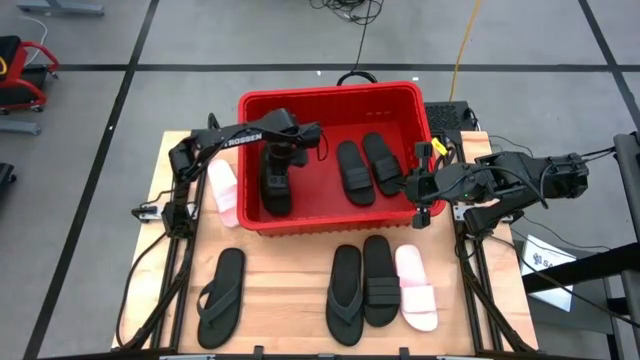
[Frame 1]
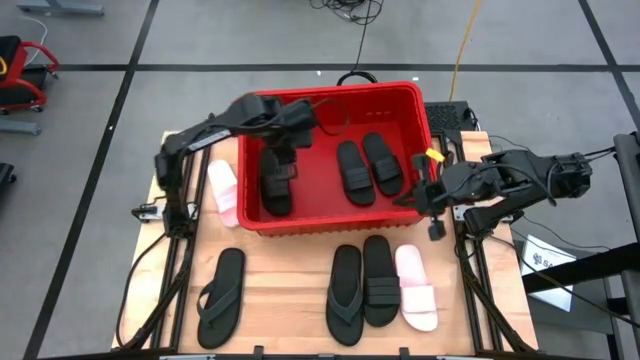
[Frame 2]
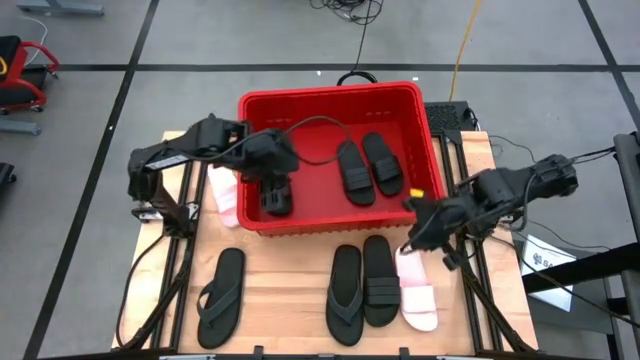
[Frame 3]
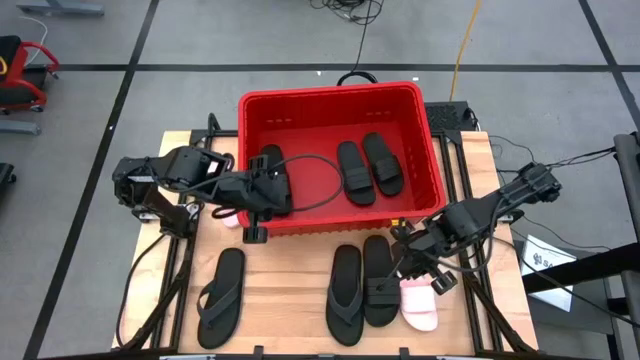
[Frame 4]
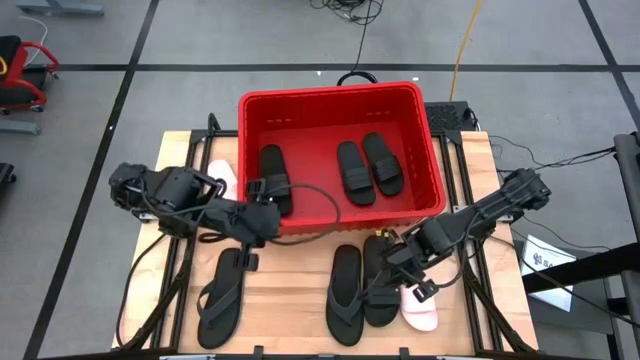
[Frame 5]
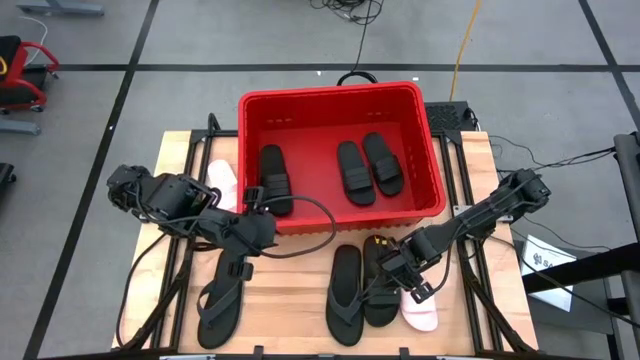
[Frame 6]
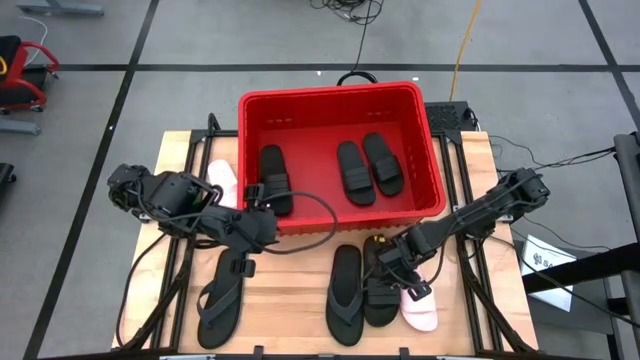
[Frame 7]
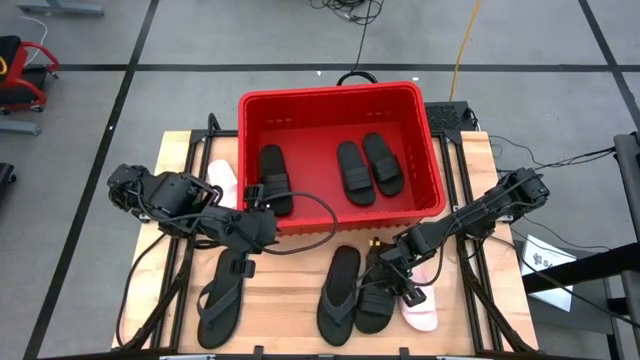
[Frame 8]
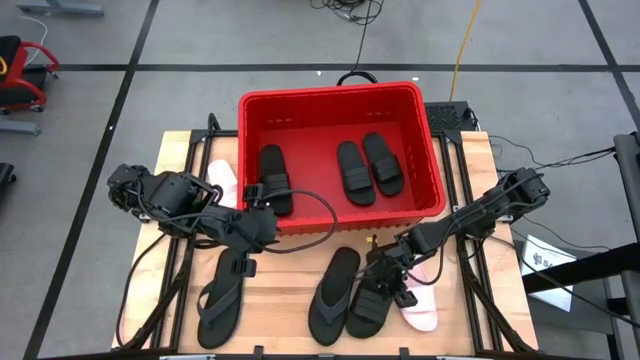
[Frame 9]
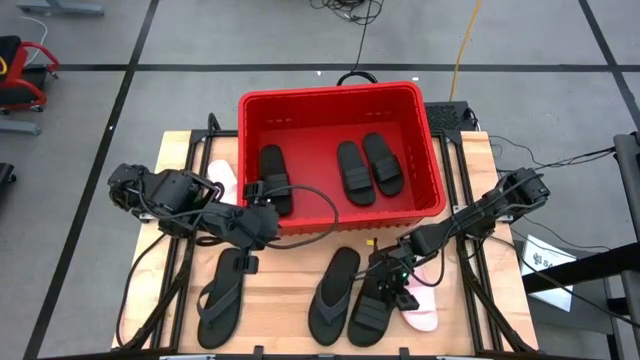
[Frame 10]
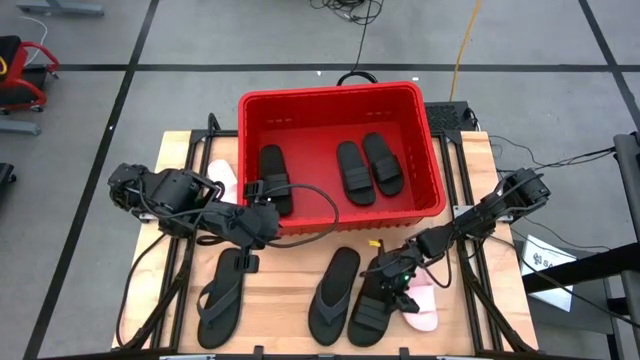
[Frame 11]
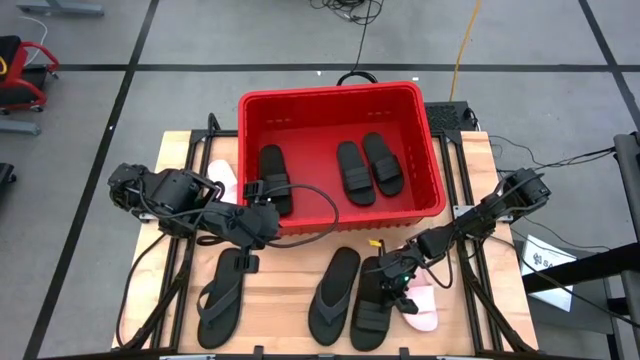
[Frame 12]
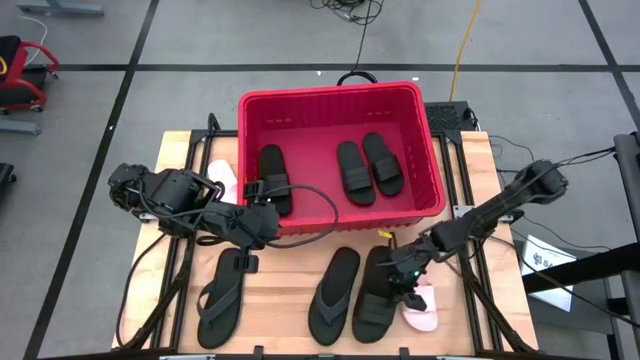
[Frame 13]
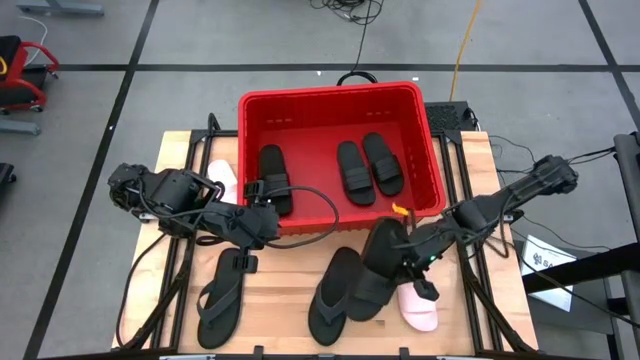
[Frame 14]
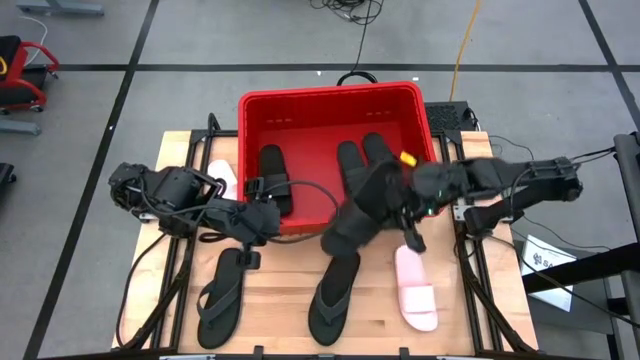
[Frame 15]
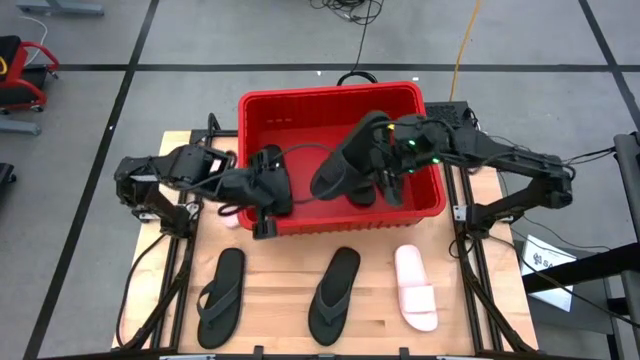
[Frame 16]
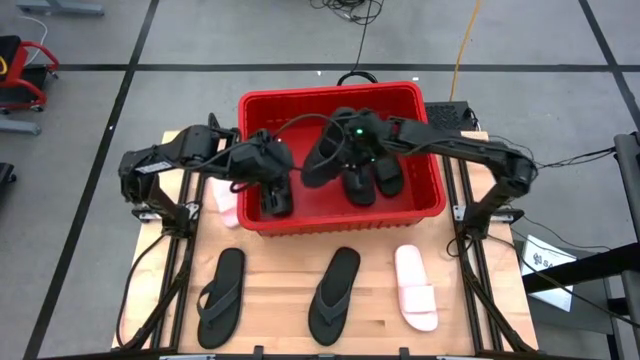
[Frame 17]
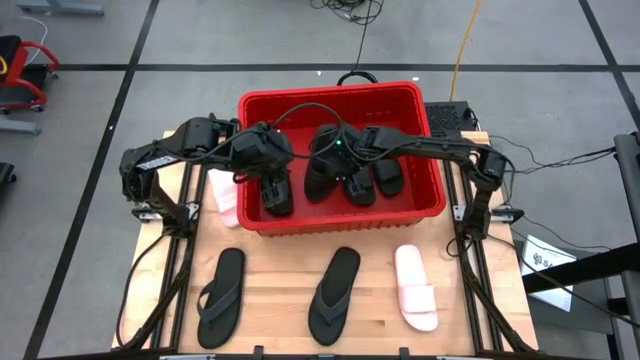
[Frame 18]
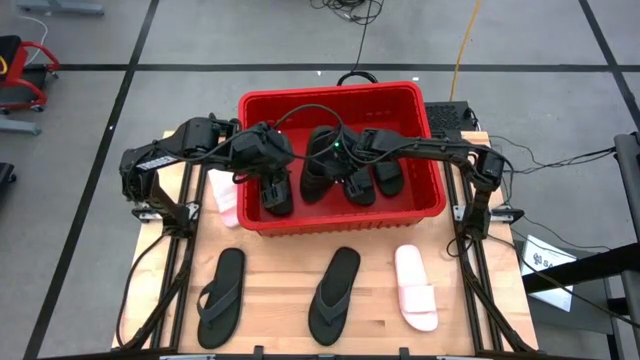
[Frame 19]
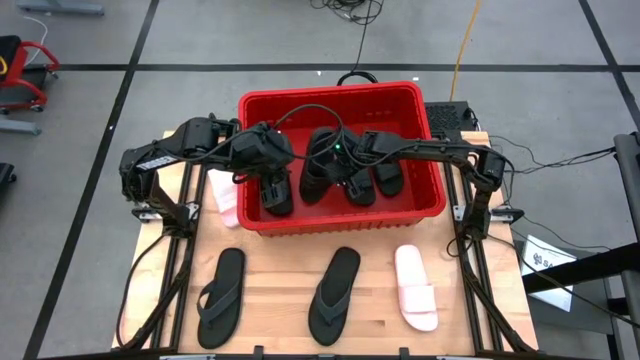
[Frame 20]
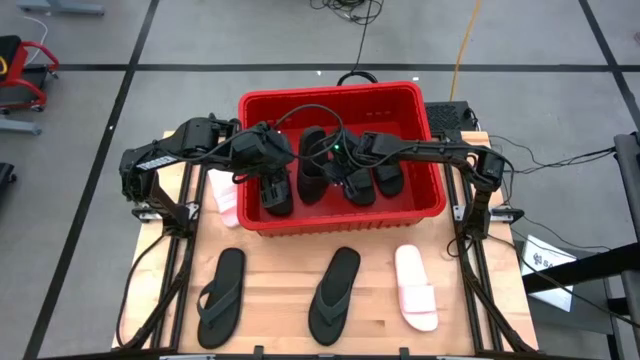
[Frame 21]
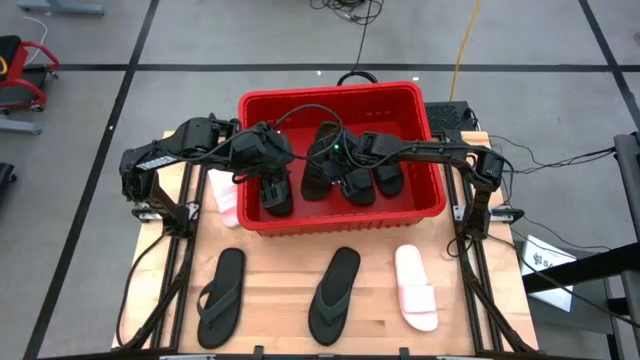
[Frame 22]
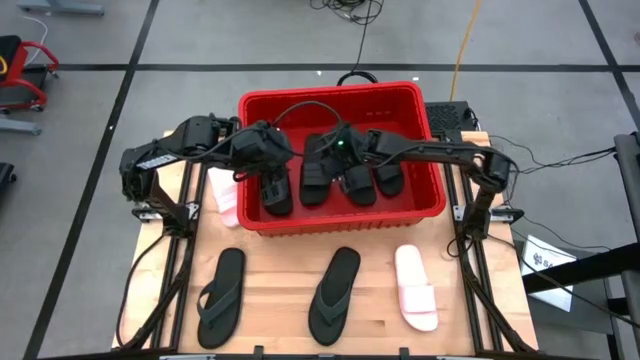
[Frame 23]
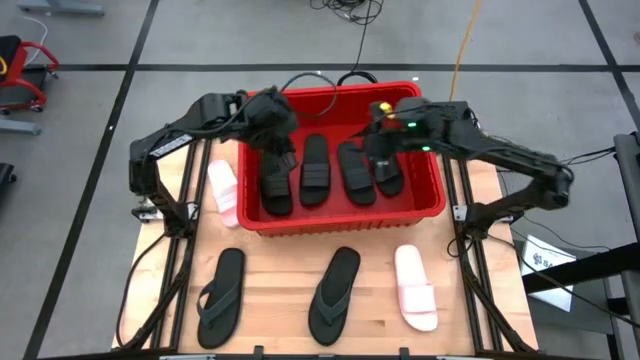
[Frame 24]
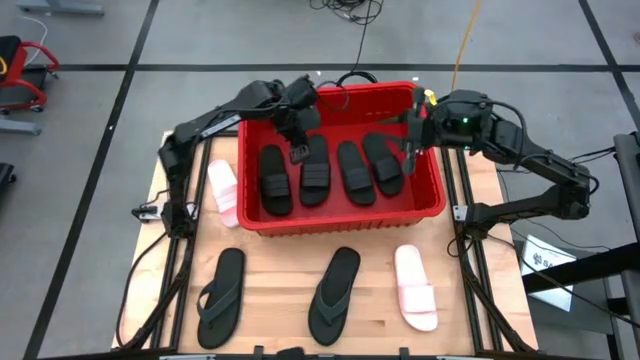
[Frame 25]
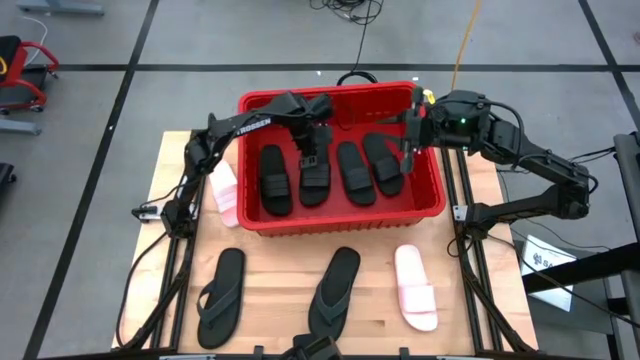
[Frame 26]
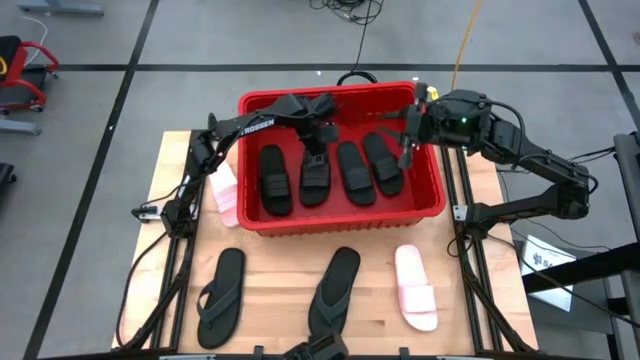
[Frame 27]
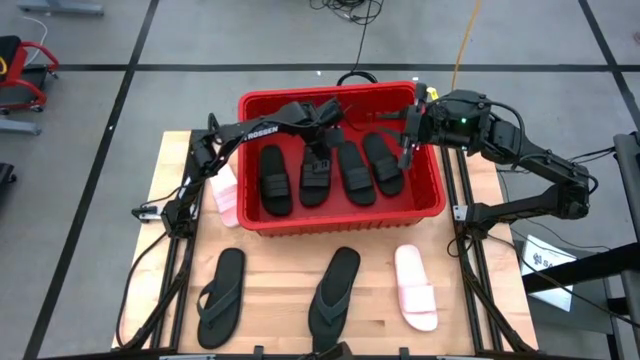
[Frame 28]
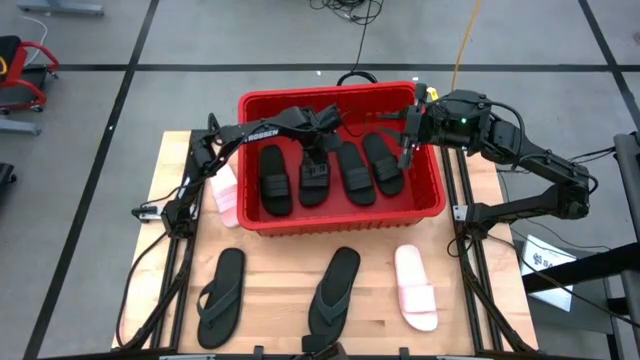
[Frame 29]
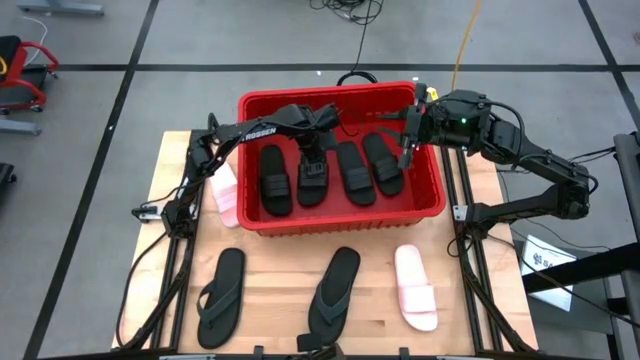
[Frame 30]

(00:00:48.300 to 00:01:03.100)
Task: Pick and place slides into bin
Put the black slipper into the red organizer bin

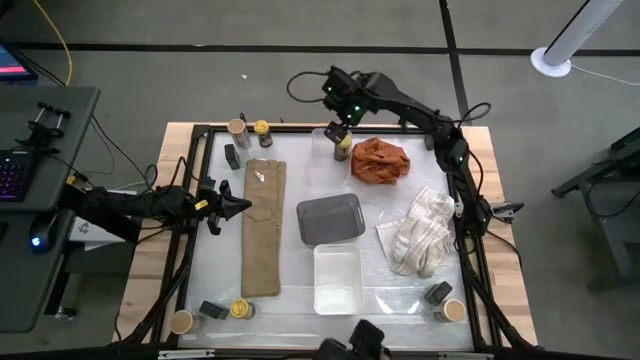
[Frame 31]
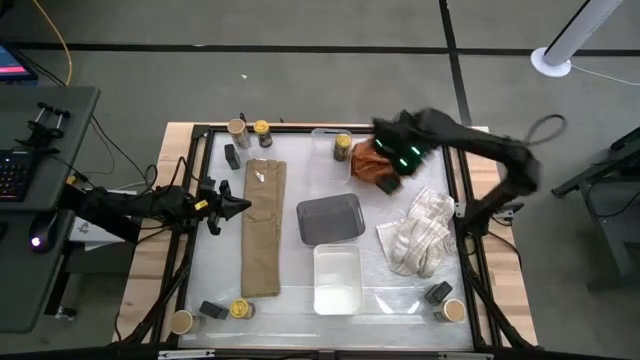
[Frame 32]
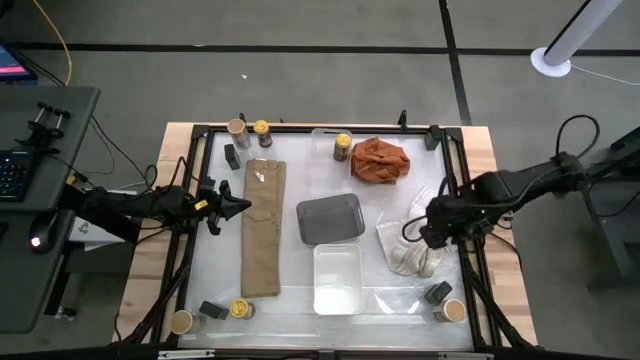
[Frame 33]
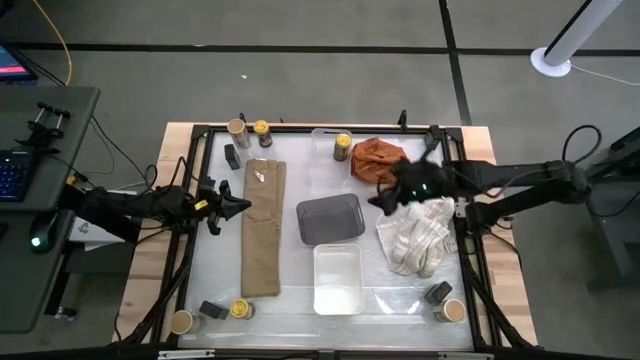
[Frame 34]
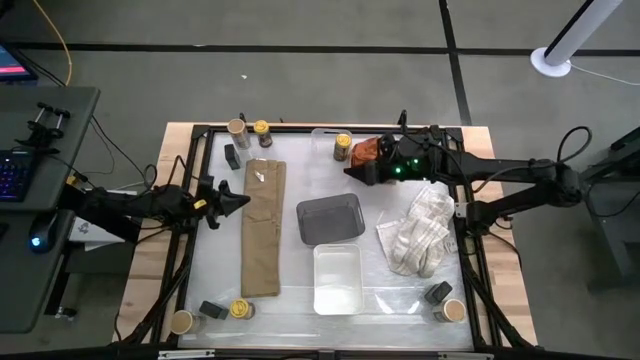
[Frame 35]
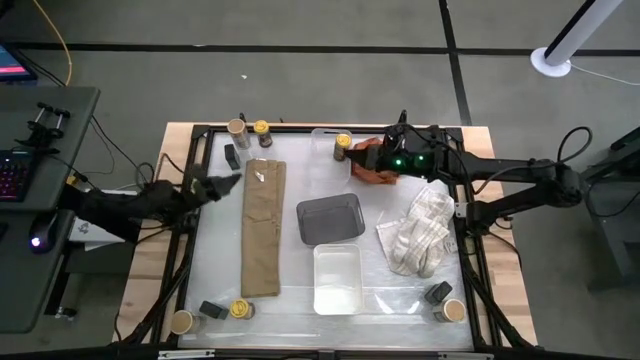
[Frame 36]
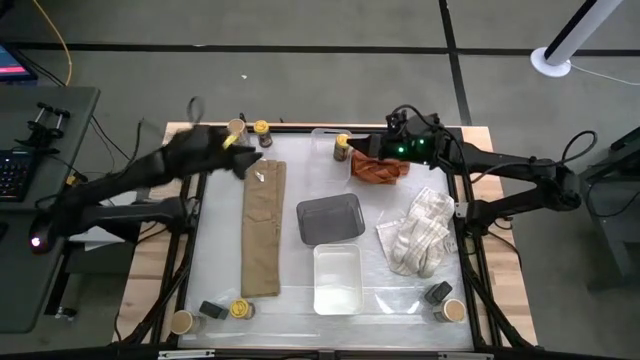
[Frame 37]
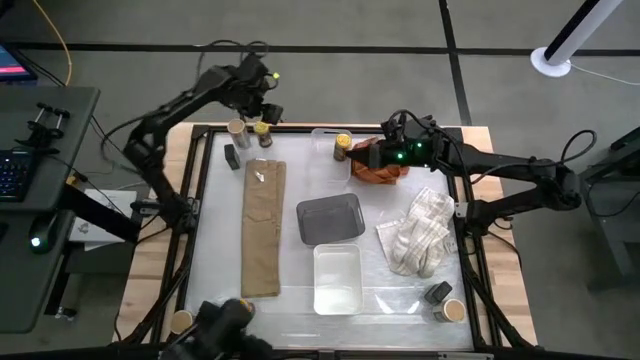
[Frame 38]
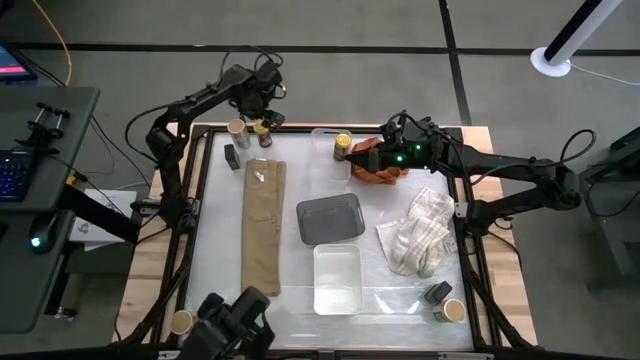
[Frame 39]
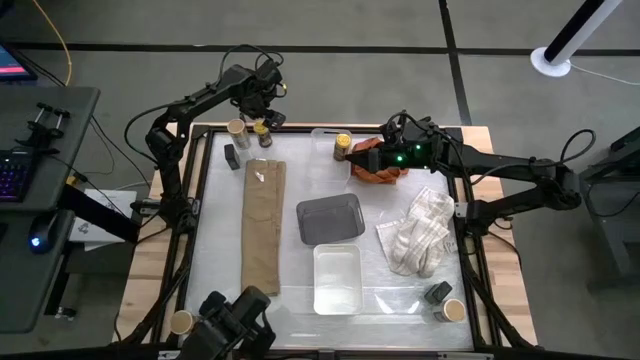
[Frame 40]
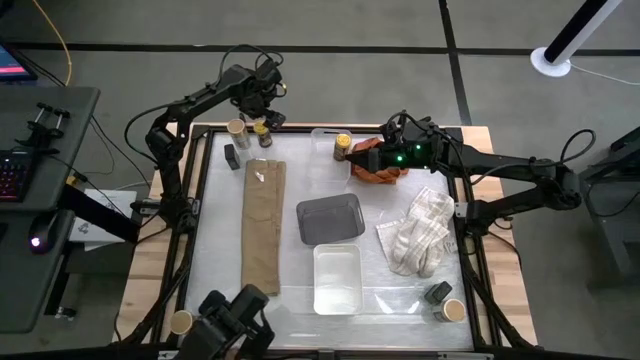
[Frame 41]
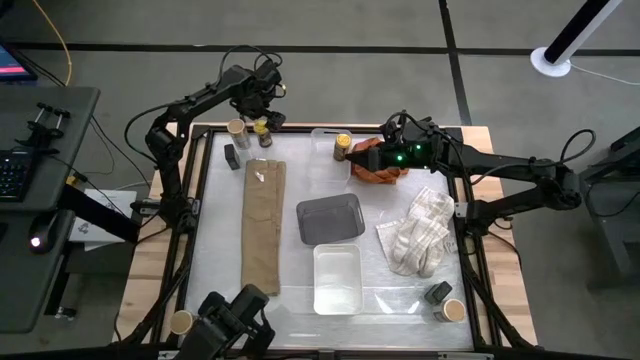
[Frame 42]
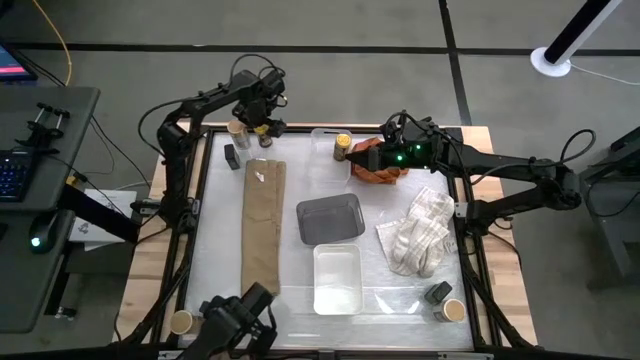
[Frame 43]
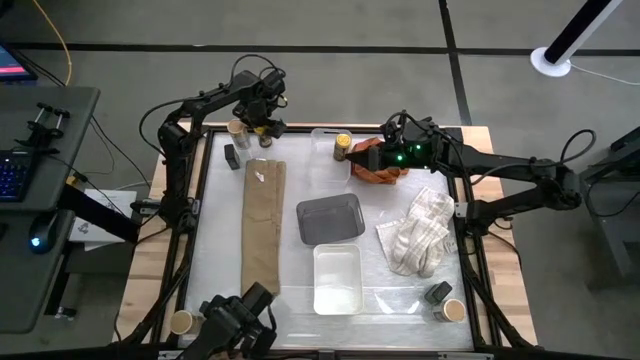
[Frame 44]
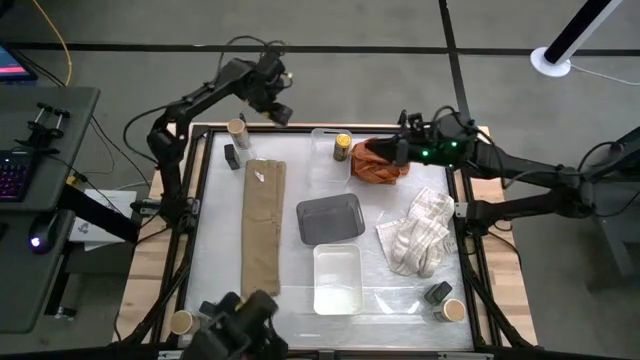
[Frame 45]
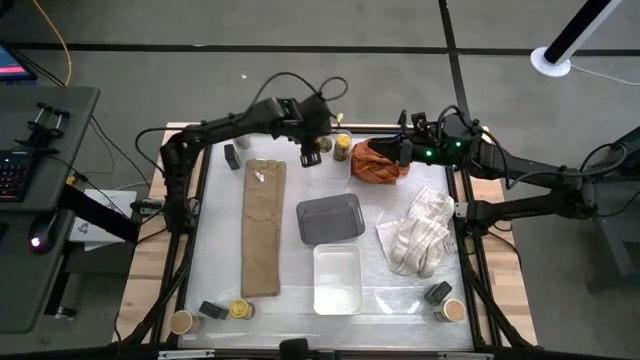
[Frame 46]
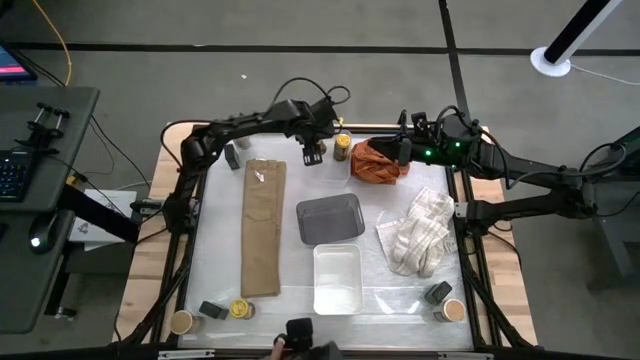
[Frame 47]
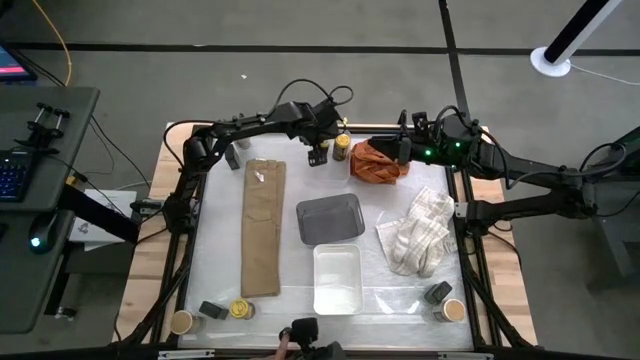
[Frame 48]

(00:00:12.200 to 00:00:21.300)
Task: Sort spices by type
Put the top yellow seasoning bottle into the transparent bin
